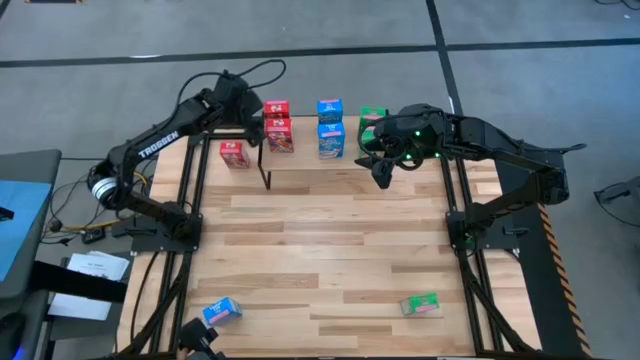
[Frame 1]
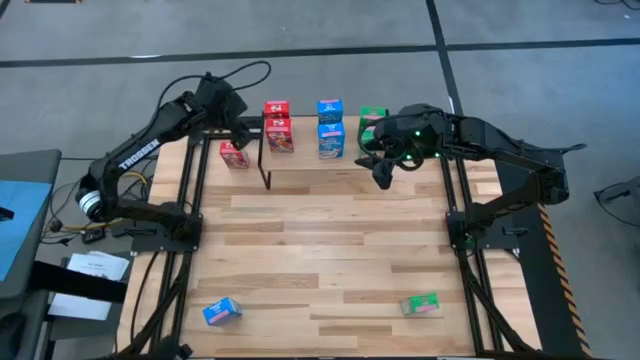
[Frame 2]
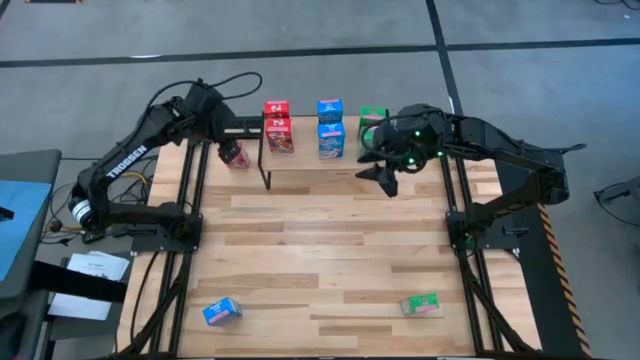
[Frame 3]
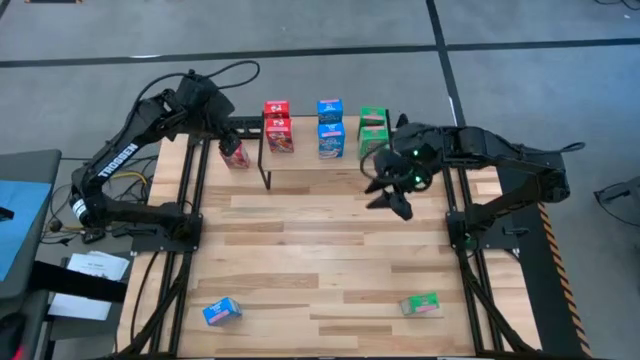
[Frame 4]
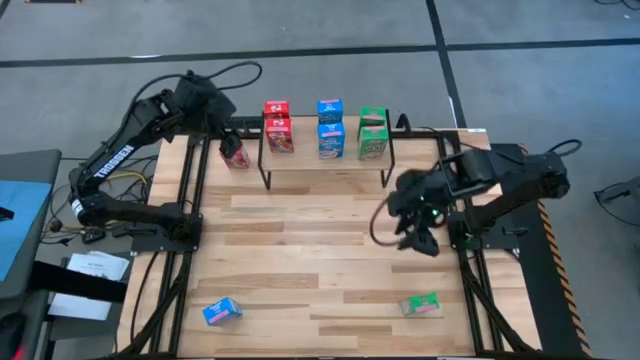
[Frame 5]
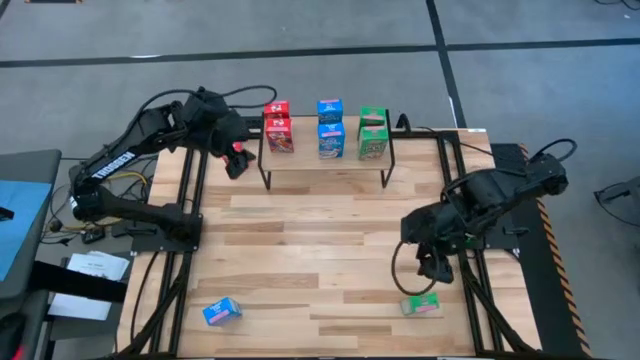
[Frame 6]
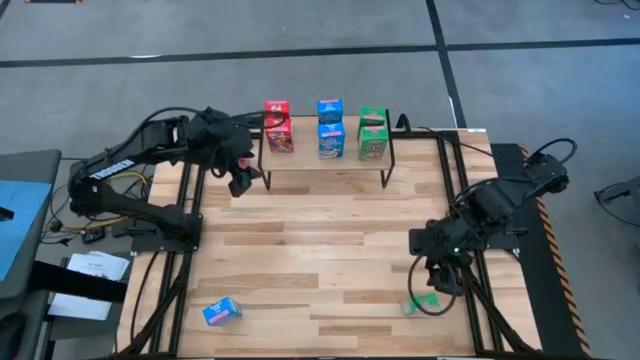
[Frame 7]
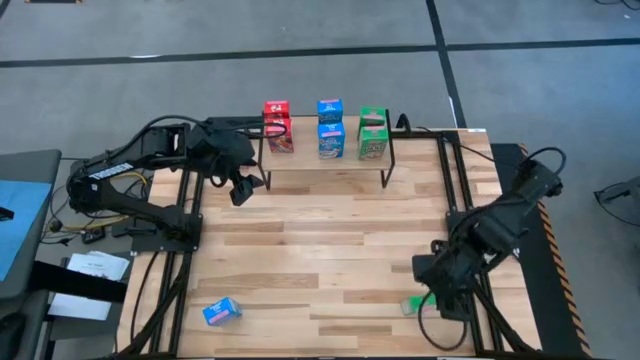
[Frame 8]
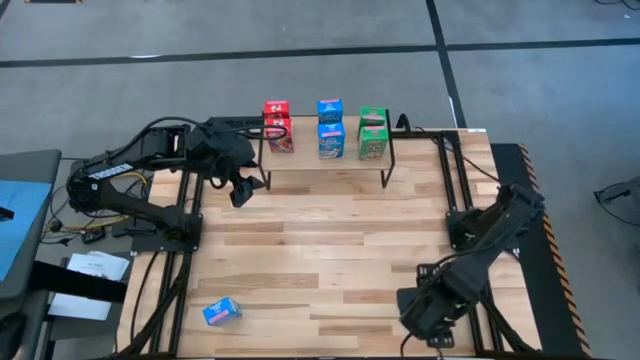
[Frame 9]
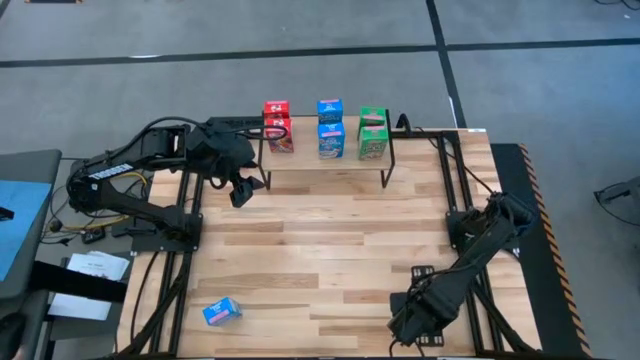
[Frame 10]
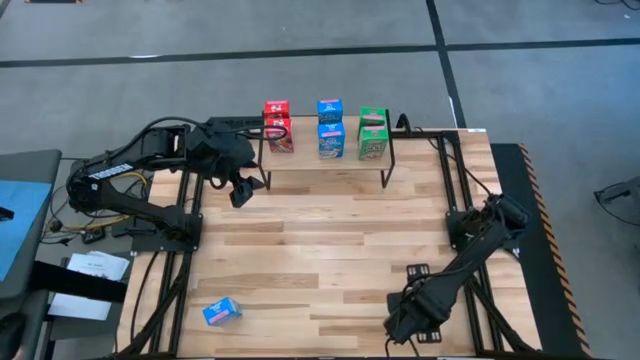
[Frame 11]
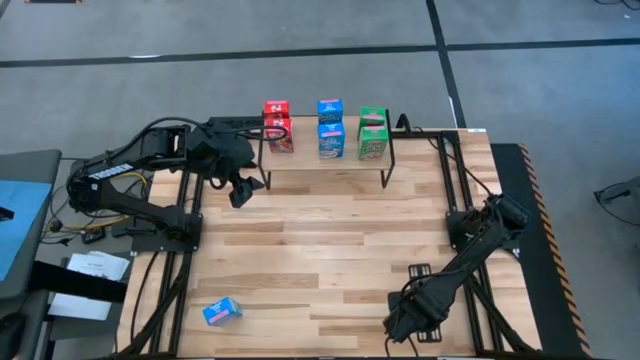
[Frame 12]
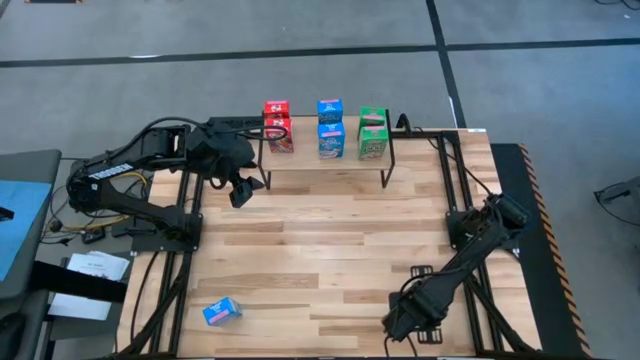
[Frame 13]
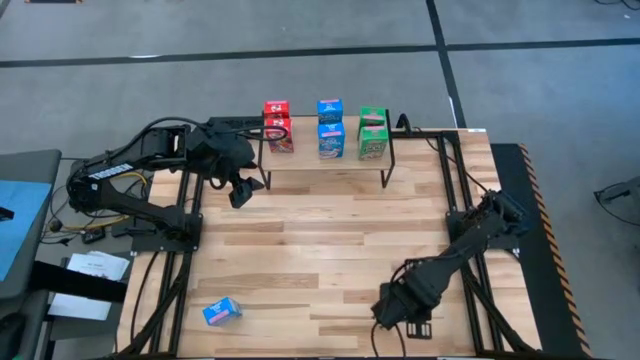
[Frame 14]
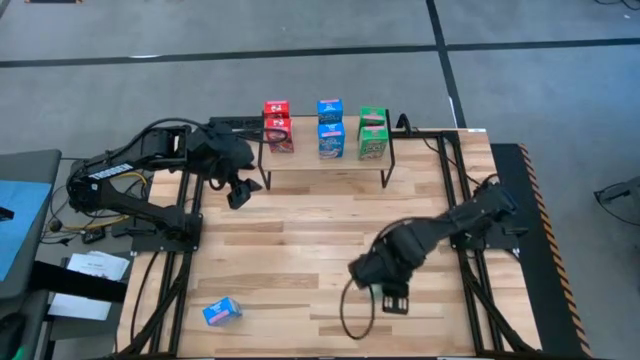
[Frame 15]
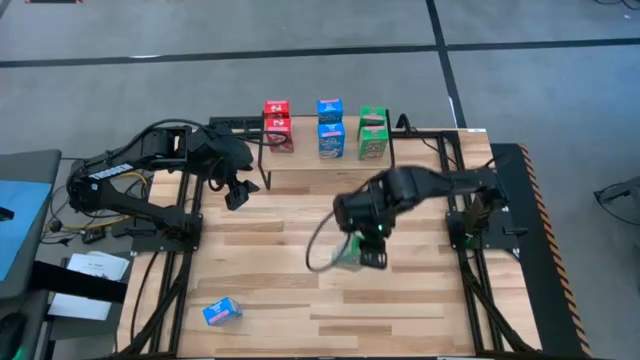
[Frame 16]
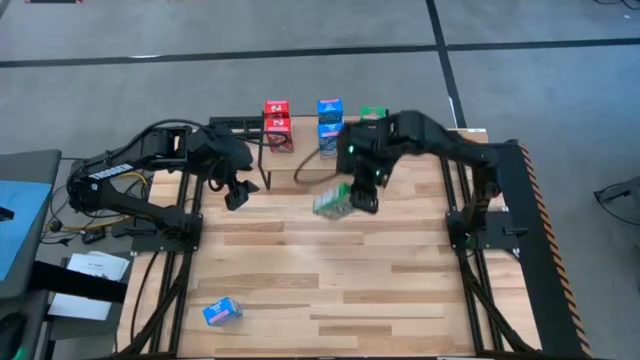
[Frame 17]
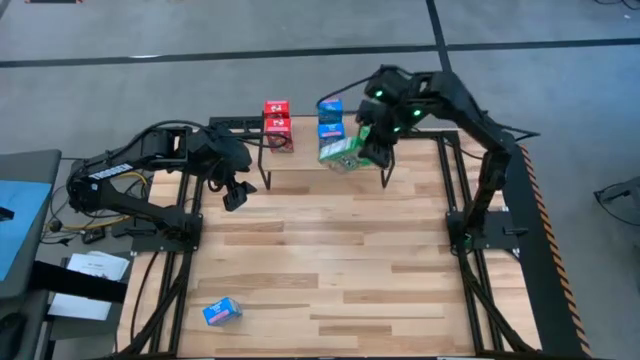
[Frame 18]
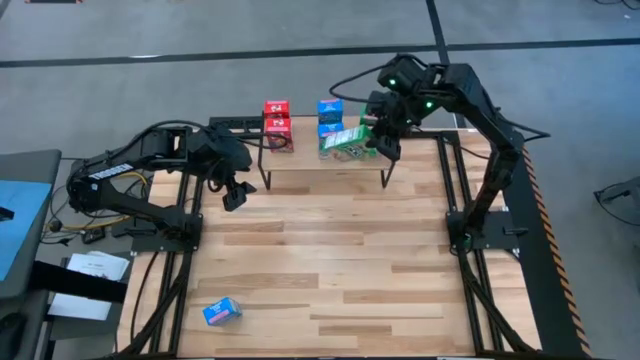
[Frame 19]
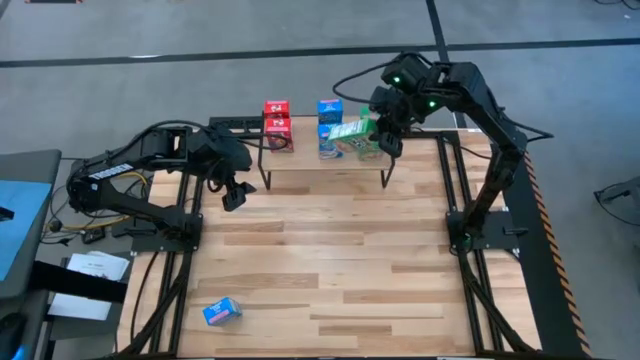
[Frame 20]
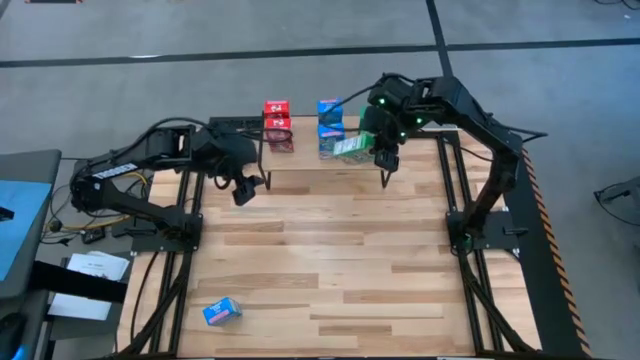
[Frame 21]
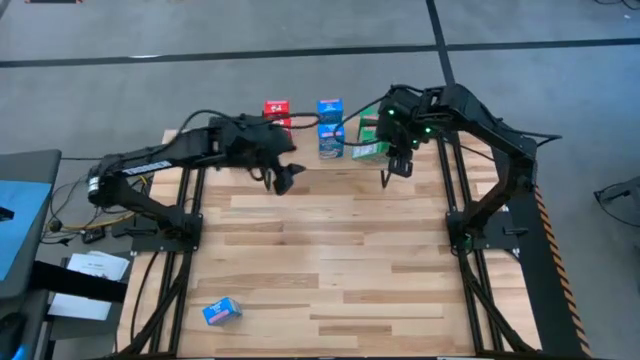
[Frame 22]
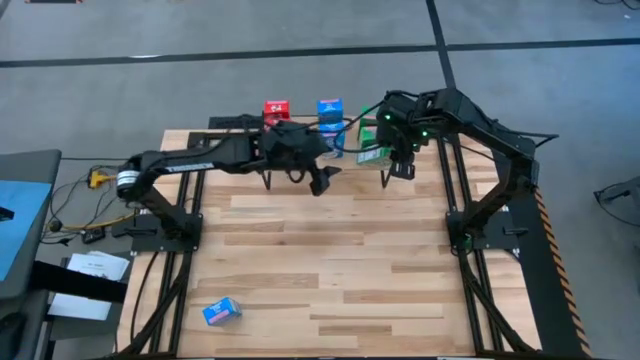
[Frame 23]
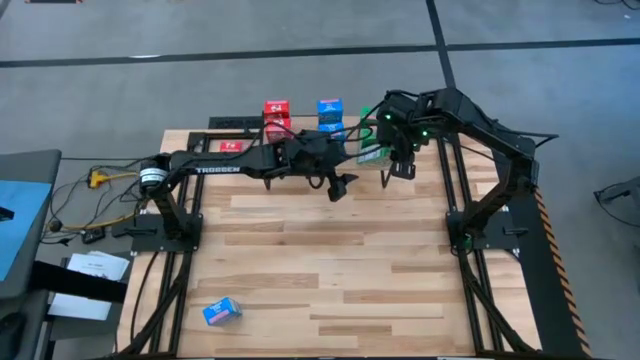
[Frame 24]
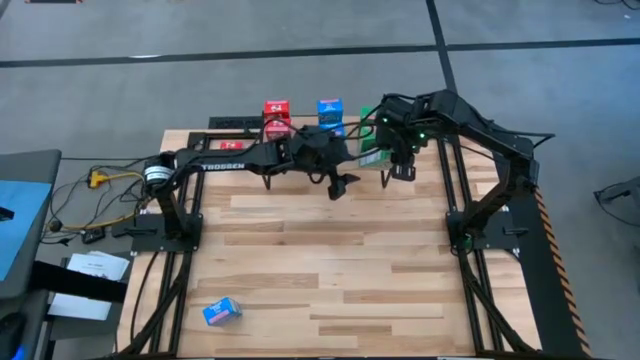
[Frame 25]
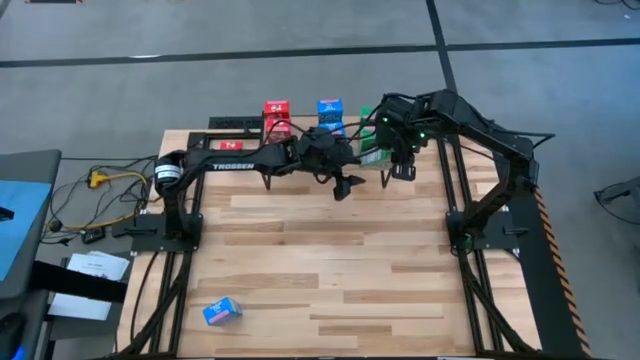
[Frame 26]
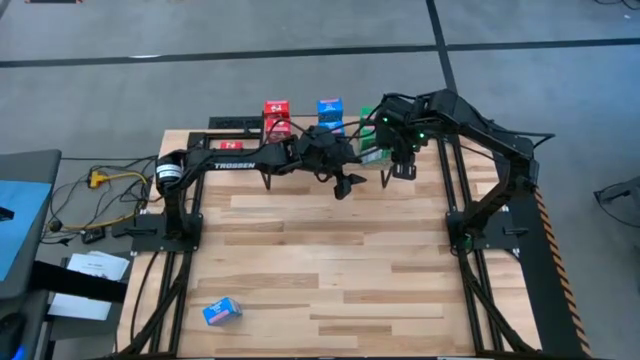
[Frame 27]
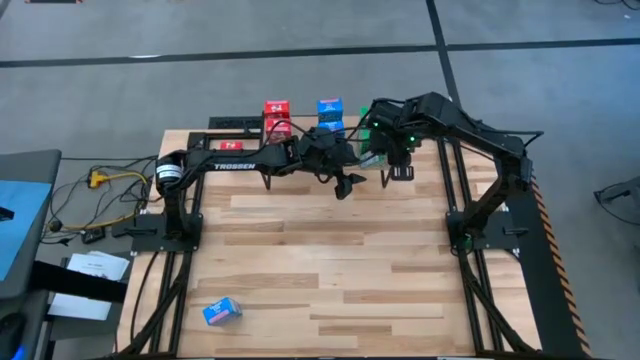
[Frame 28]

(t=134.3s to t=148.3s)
Task: Stack cereal on shelf
Put the green cereal box on the shelf aligned with the other green cereal box

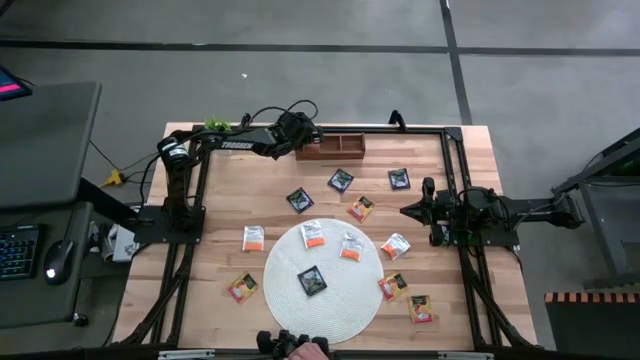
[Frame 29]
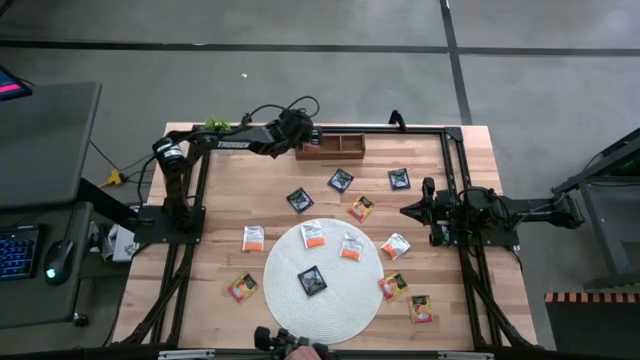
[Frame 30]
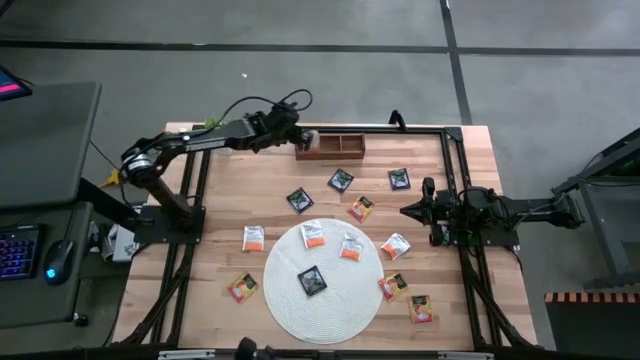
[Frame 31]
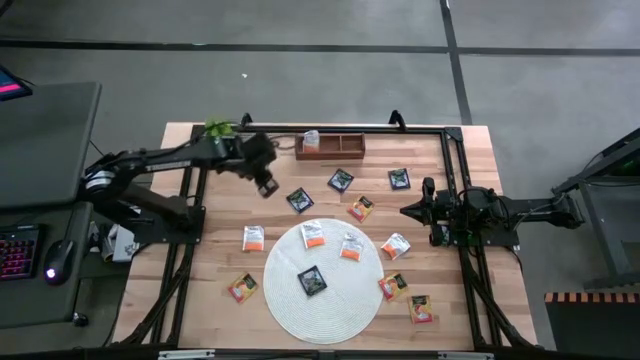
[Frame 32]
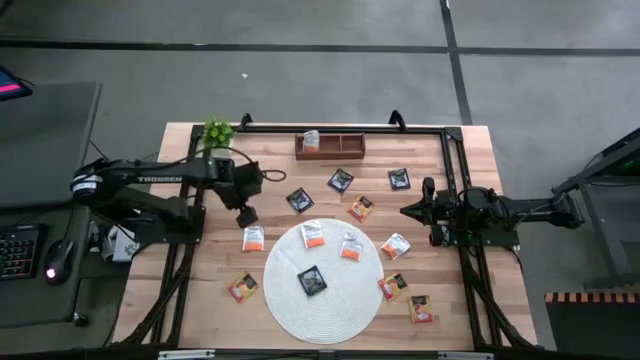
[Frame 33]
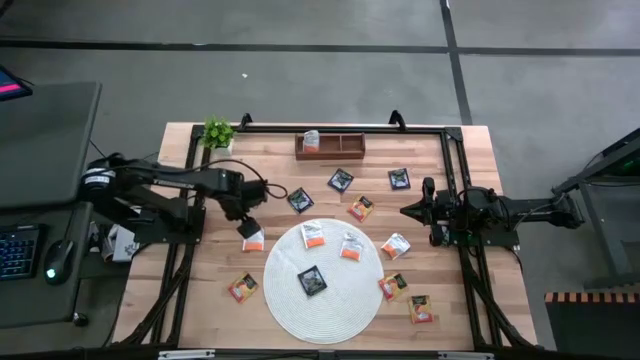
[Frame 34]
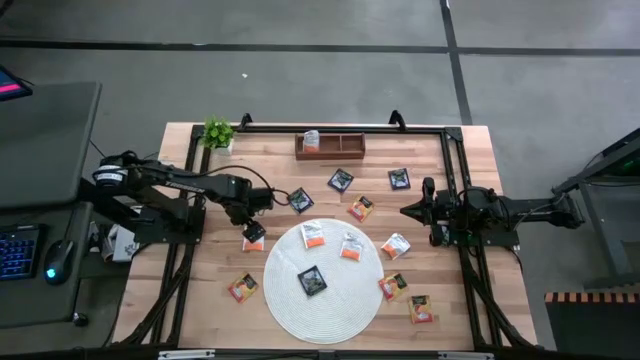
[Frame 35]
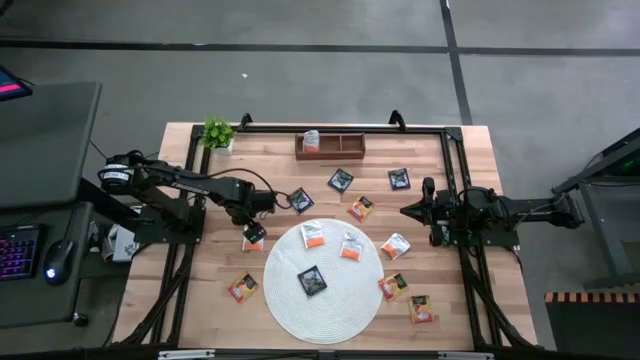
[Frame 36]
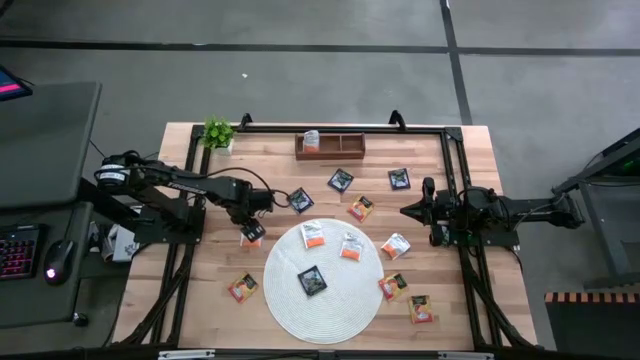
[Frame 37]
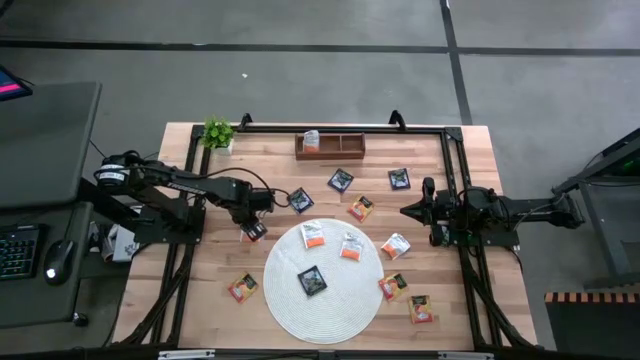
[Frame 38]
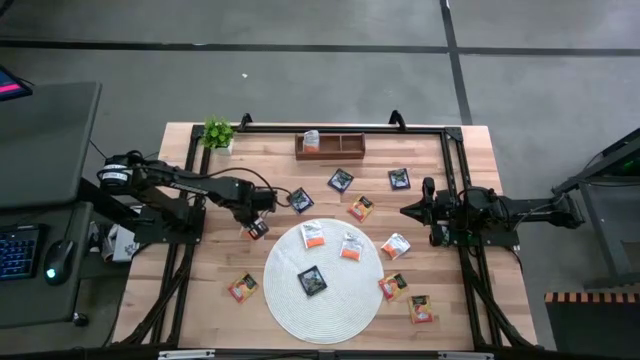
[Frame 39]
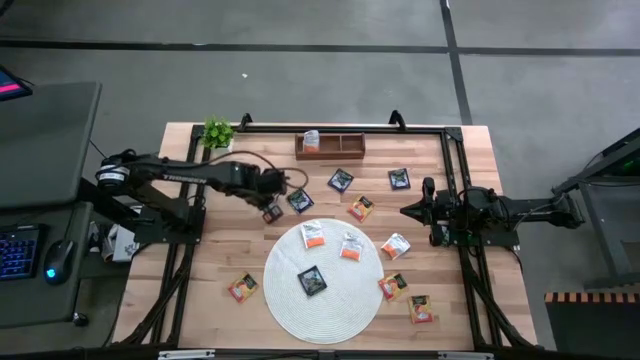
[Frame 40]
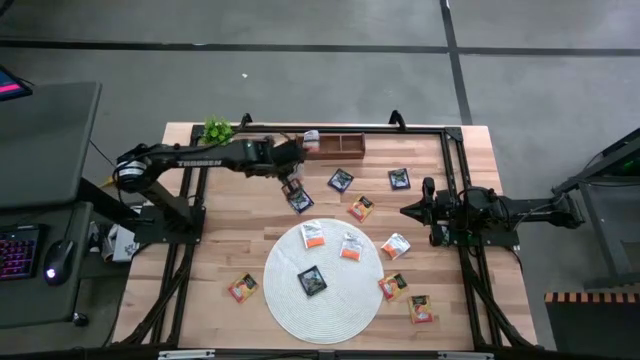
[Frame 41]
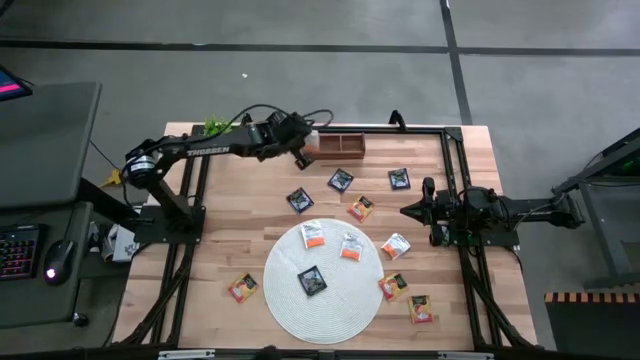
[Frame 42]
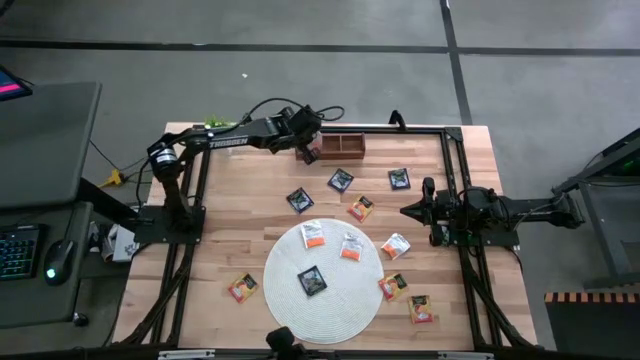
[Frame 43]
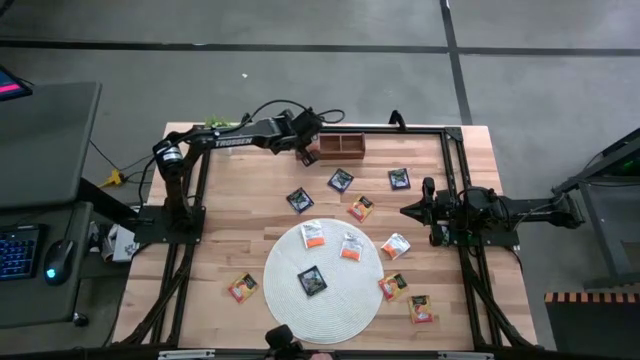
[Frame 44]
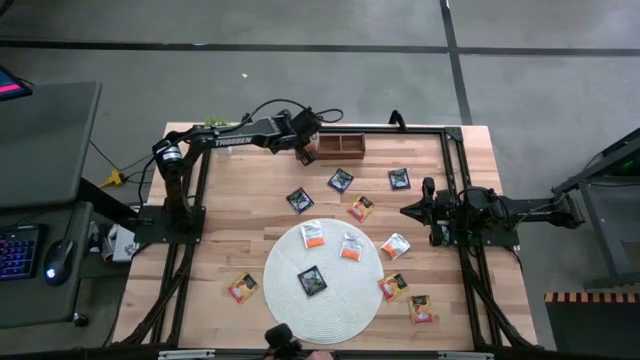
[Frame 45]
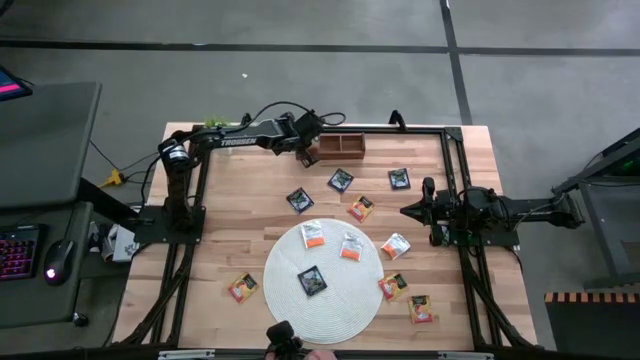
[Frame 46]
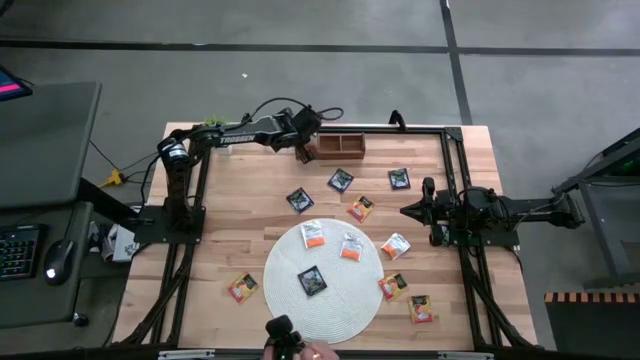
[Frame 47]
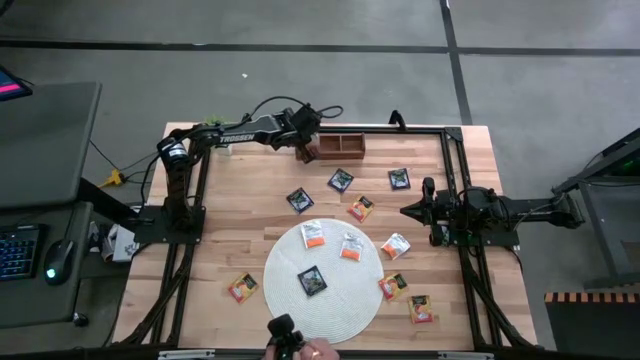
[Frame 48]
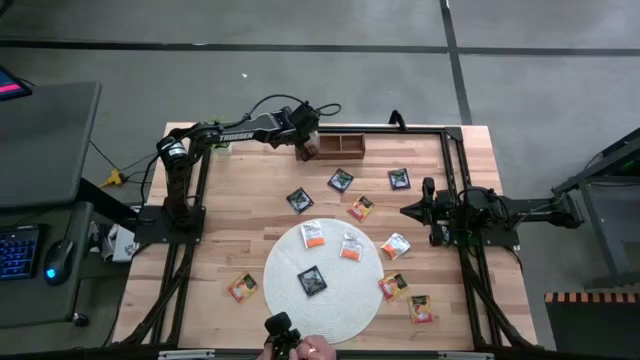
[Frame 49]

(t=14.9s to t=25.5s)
Task: Pick & Place Tea
Put the white tea bag into the left section of the wooden organizer
